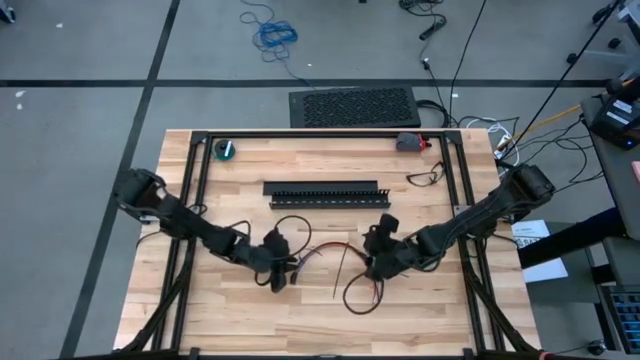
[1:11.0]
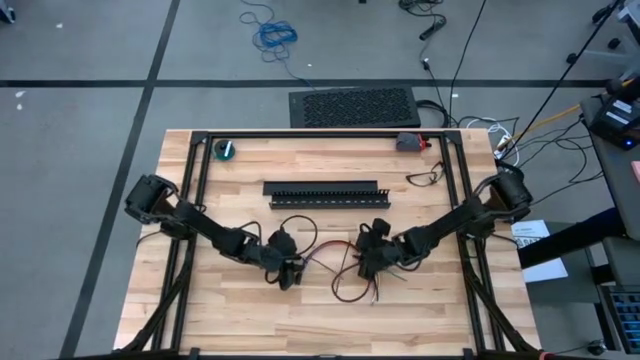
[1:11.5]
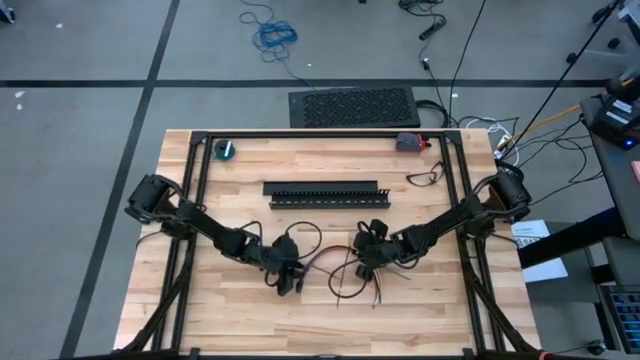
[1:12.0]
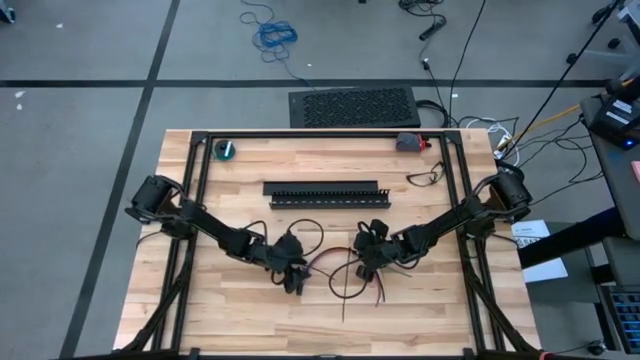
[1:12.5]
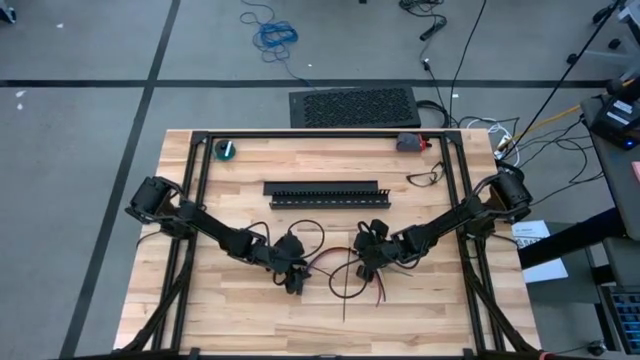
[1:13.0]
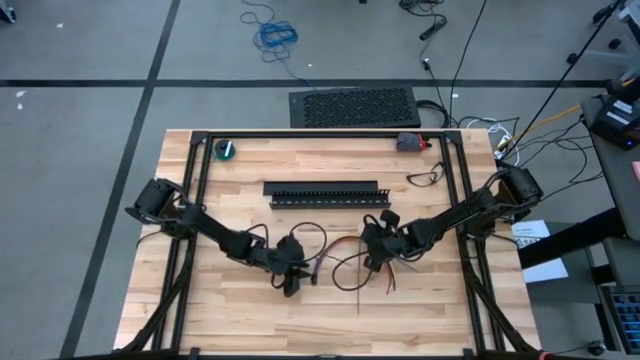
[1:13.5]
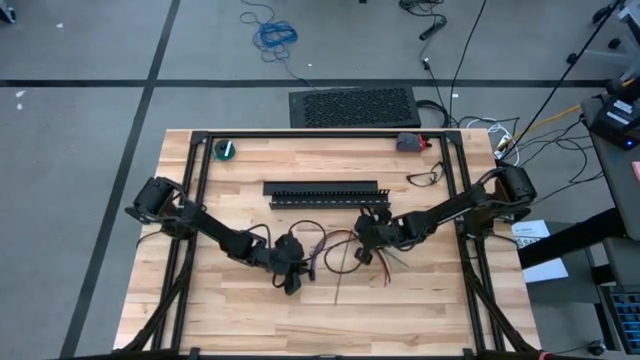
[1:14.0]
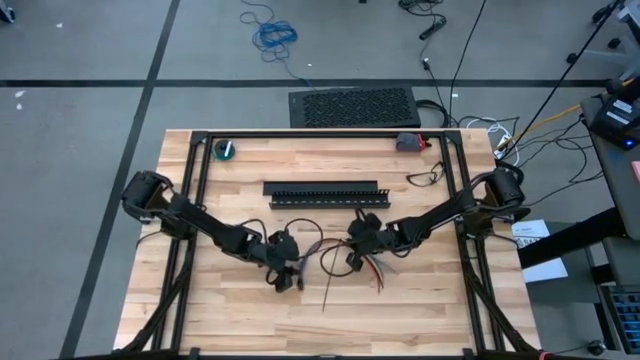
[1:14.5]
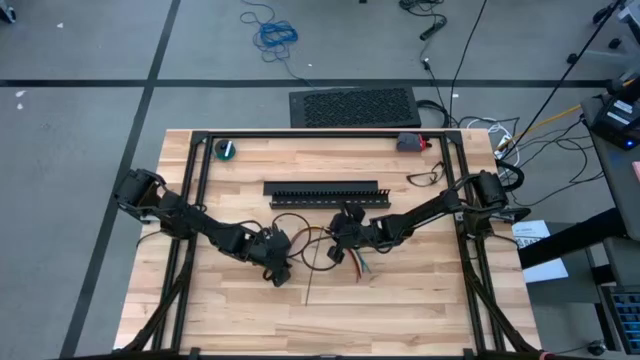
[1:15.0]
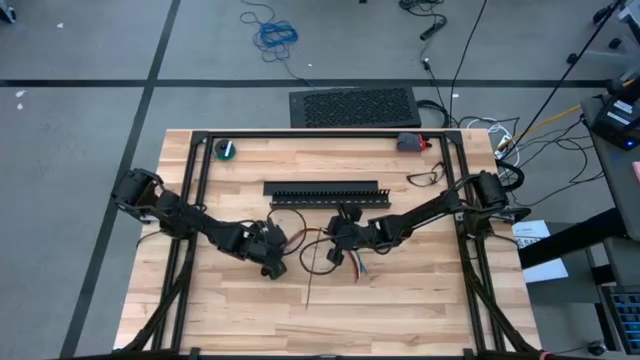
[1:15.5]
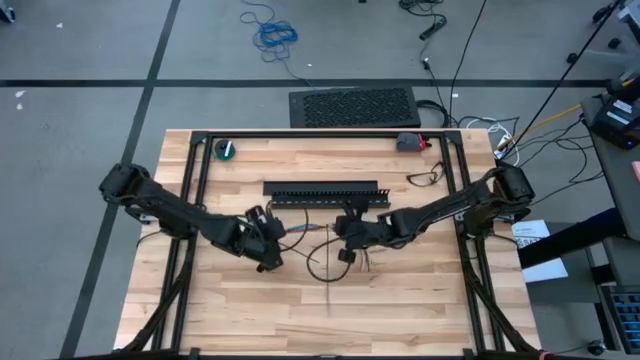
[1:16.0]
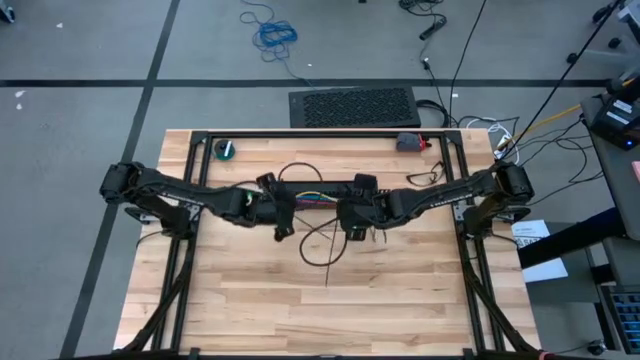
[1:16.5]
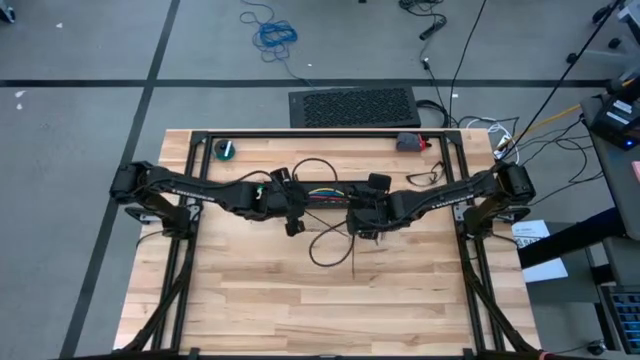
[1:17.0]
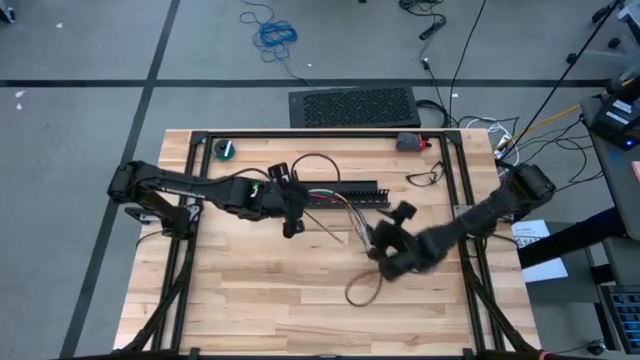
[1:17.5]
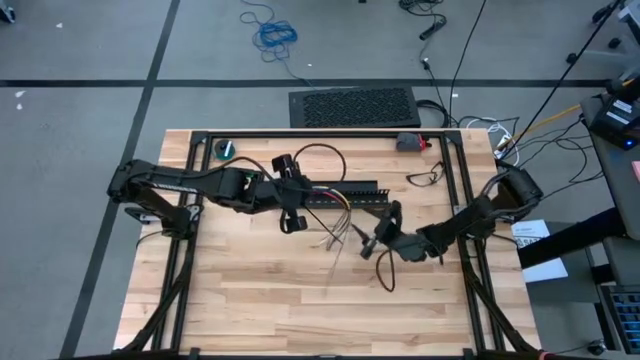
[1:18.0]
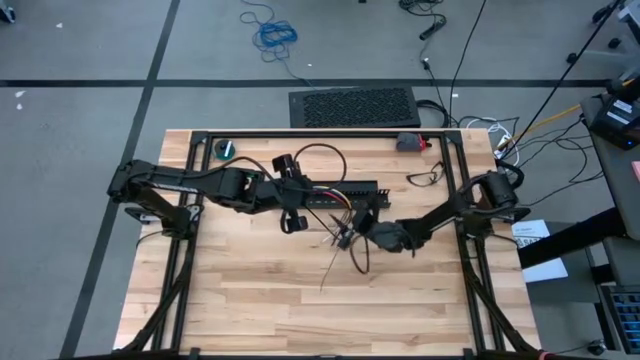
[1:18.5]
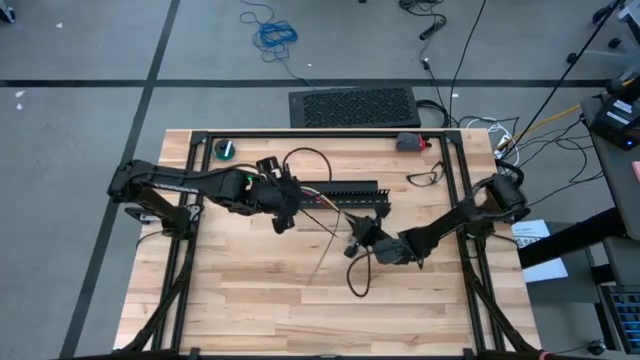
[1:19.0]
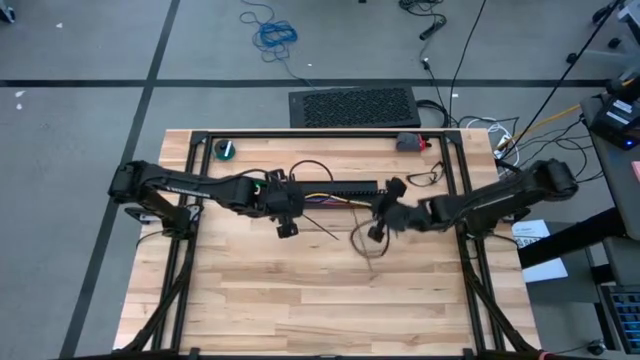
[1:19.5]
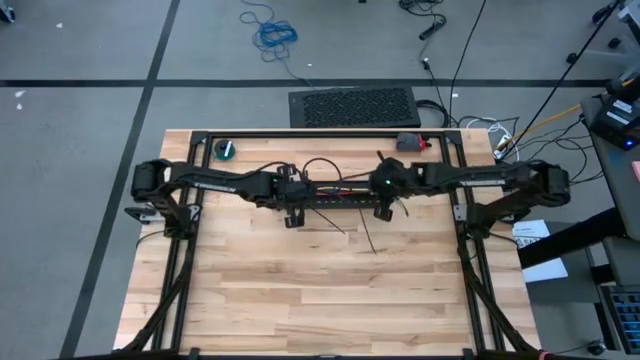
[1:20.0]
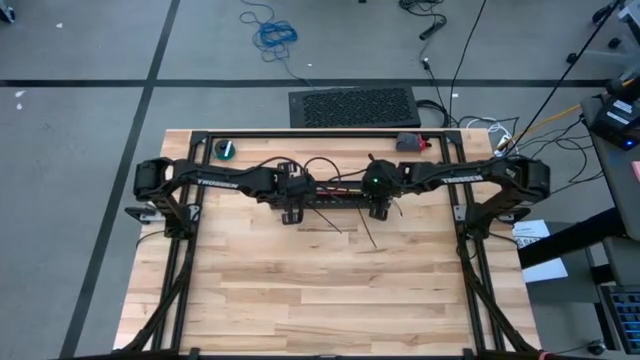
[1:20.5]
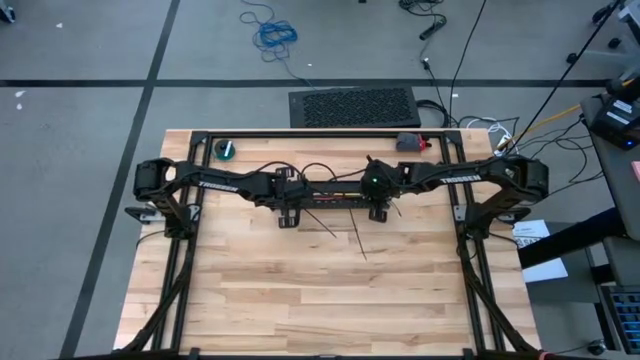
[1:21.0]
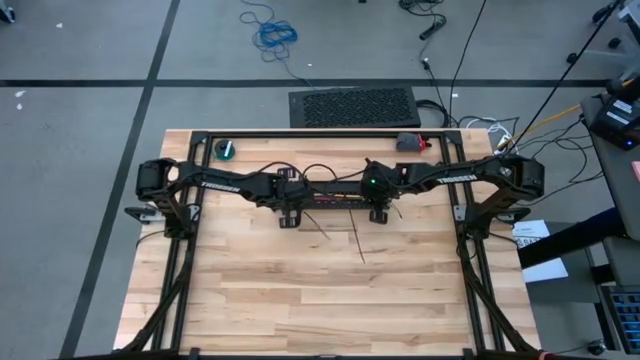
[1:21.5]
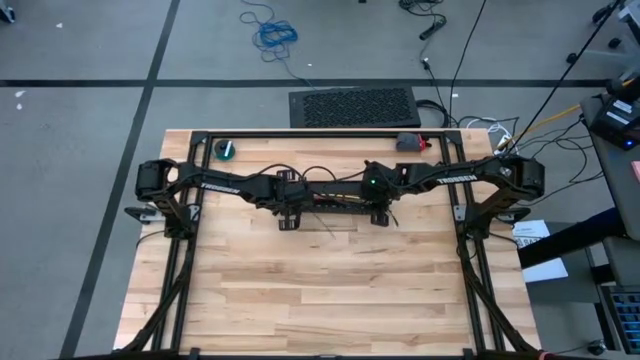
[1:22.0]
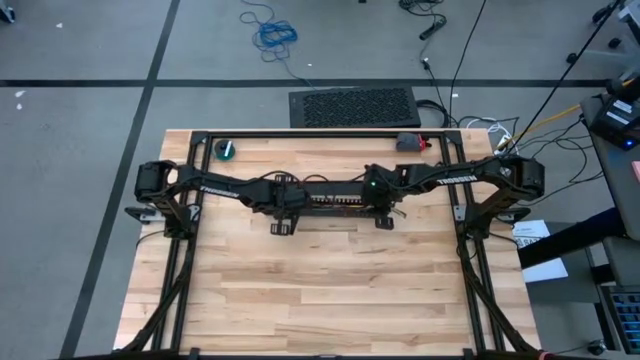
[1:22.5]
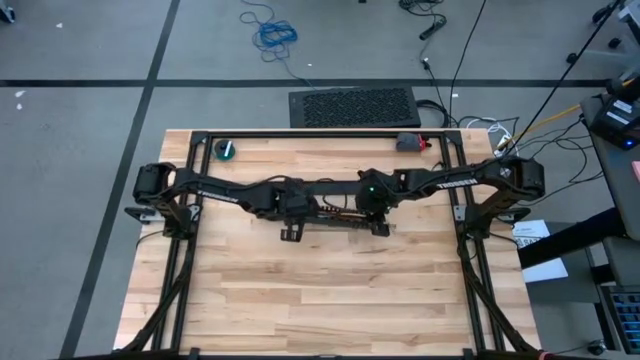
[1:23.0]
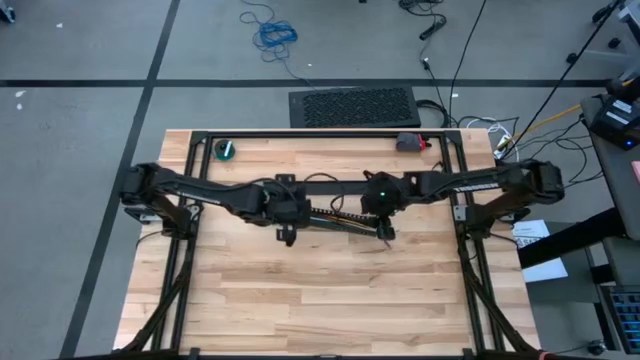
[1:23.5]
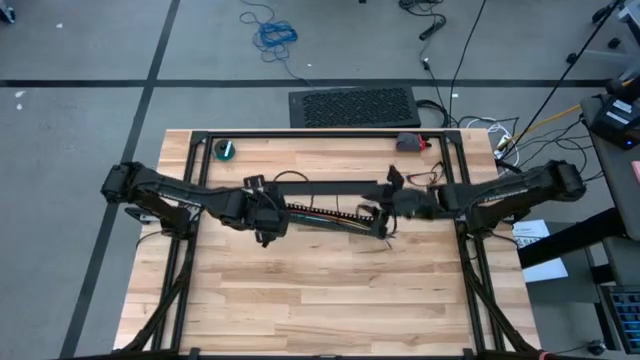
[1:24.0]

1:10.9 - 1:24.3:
Task: Ziptie cables
Put zip-tied cables in cable duct
